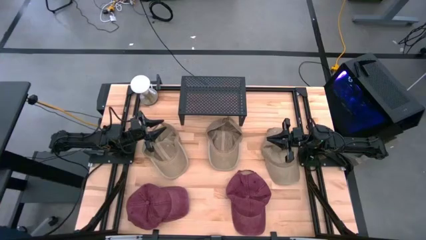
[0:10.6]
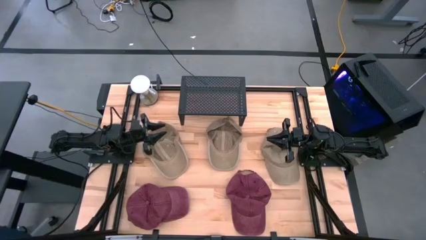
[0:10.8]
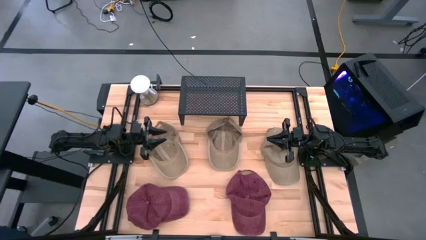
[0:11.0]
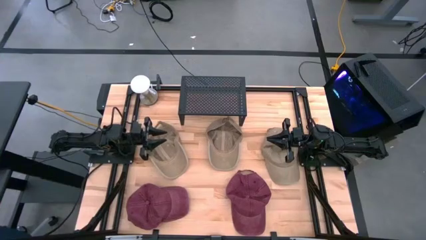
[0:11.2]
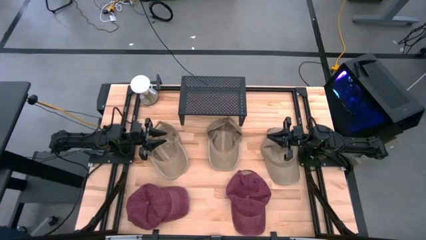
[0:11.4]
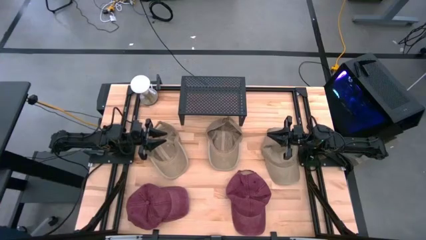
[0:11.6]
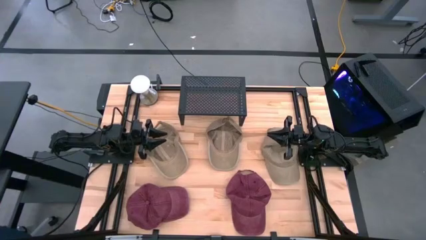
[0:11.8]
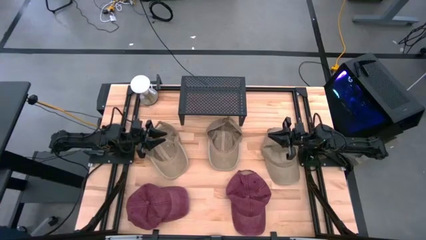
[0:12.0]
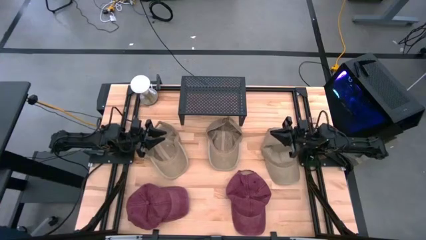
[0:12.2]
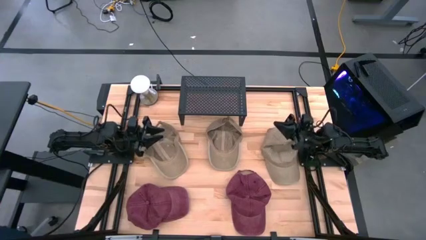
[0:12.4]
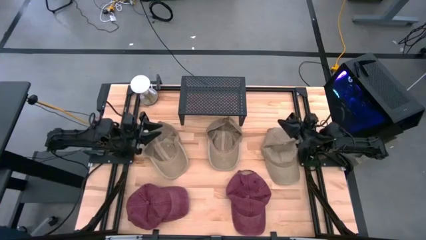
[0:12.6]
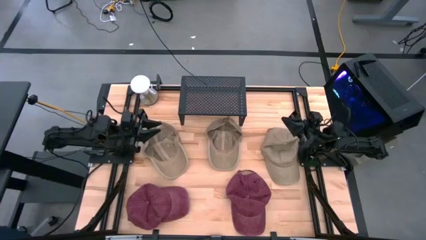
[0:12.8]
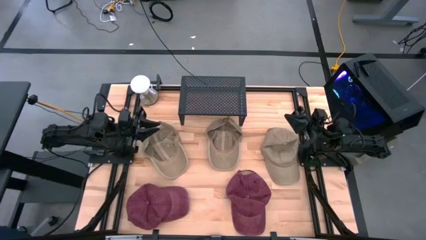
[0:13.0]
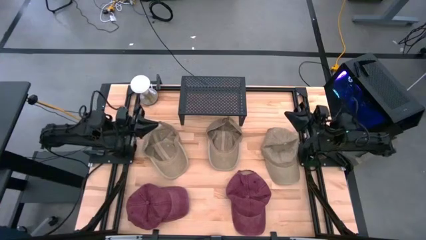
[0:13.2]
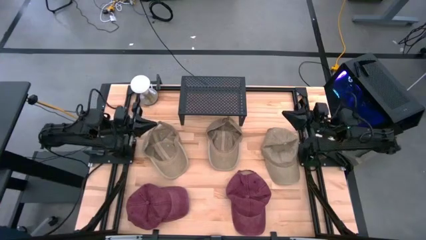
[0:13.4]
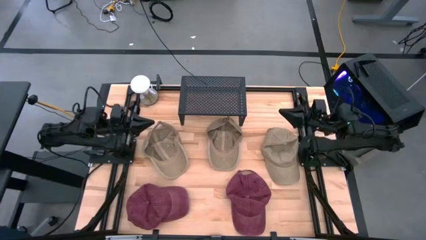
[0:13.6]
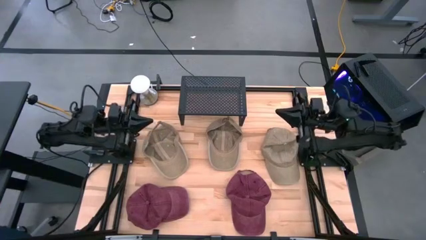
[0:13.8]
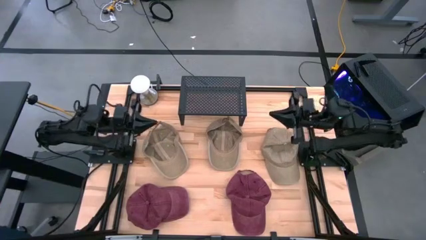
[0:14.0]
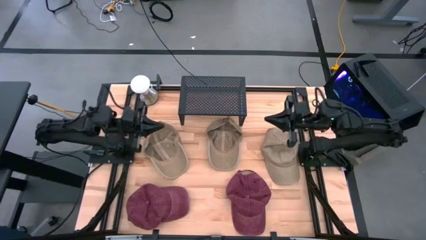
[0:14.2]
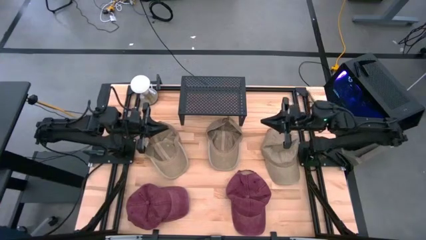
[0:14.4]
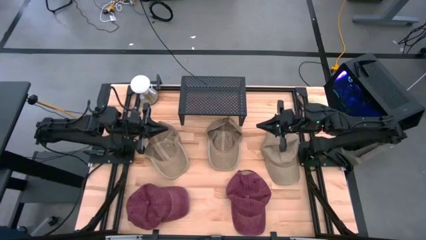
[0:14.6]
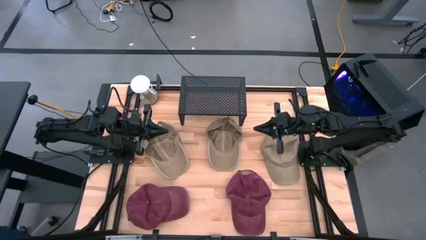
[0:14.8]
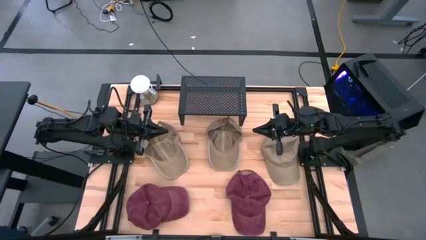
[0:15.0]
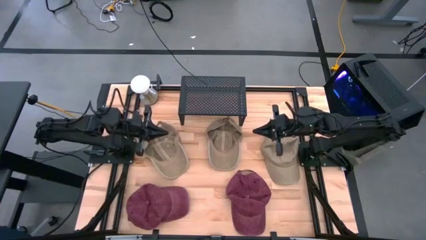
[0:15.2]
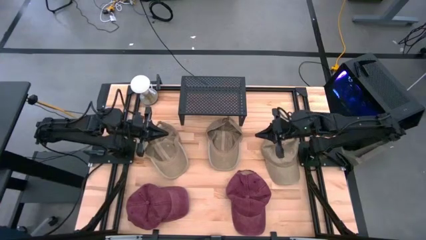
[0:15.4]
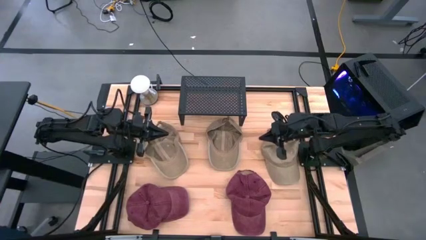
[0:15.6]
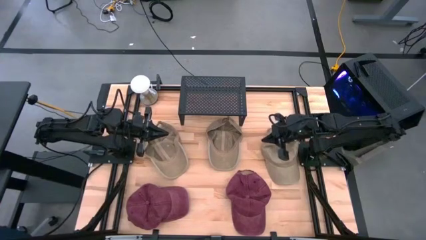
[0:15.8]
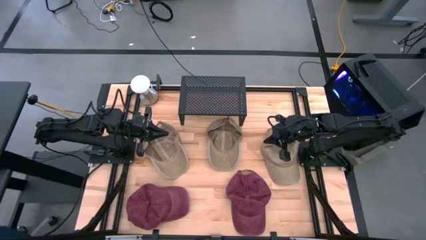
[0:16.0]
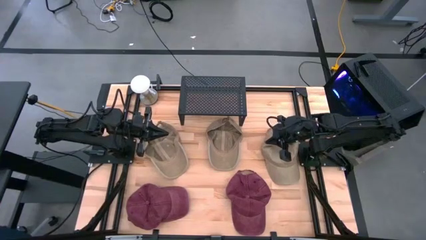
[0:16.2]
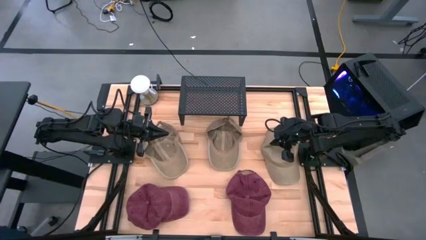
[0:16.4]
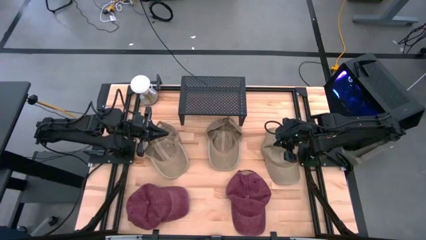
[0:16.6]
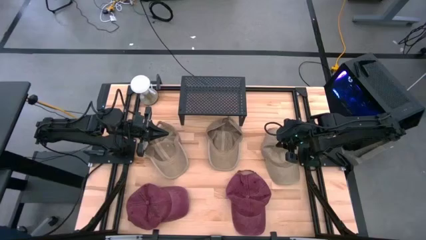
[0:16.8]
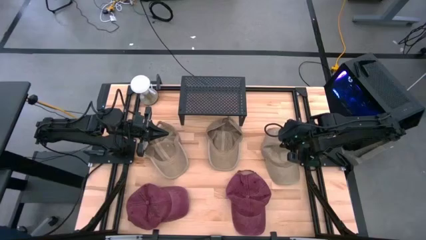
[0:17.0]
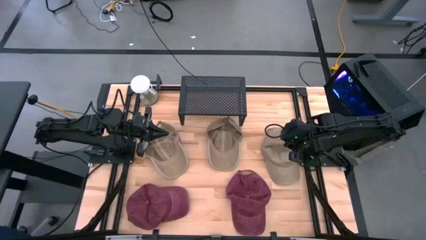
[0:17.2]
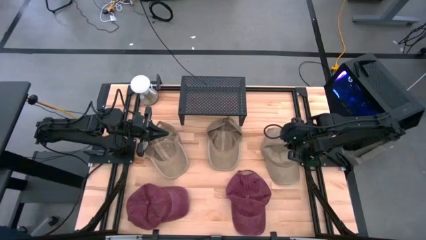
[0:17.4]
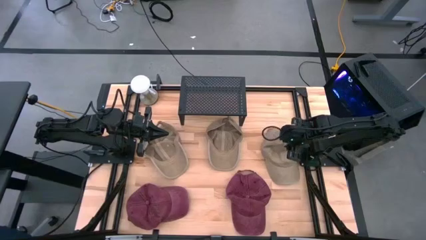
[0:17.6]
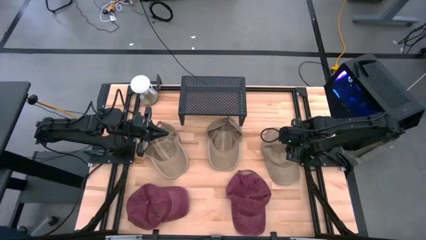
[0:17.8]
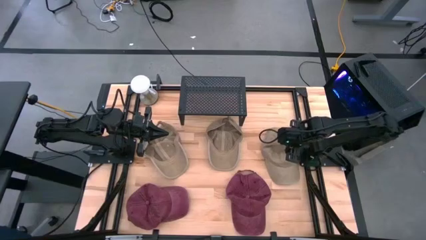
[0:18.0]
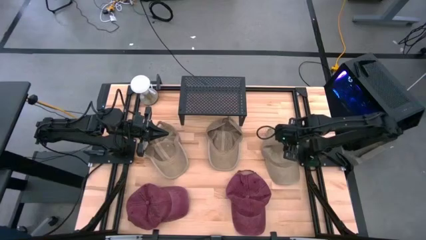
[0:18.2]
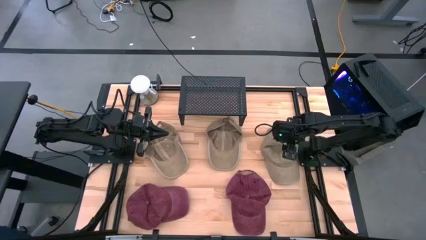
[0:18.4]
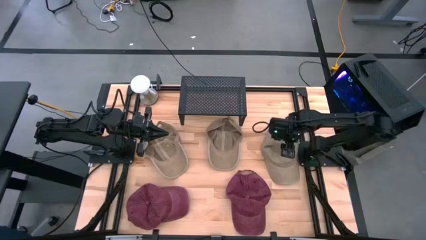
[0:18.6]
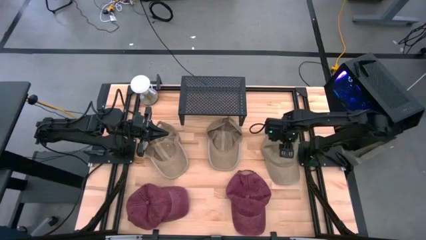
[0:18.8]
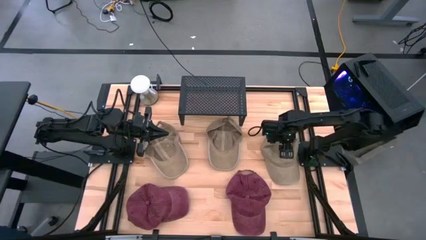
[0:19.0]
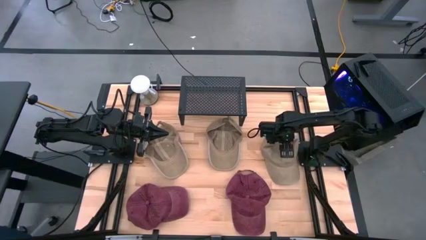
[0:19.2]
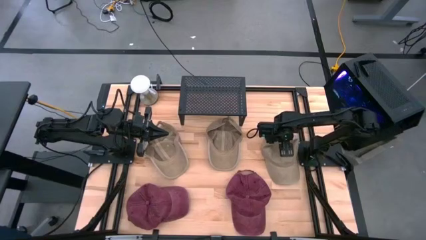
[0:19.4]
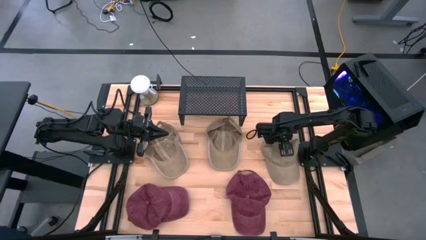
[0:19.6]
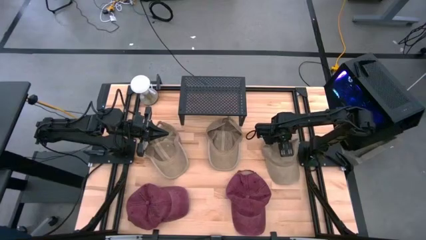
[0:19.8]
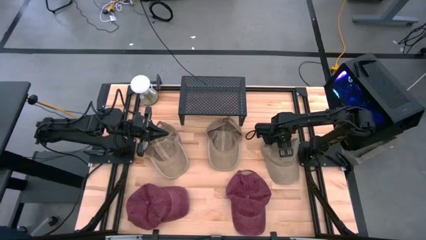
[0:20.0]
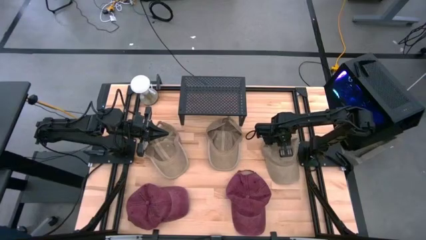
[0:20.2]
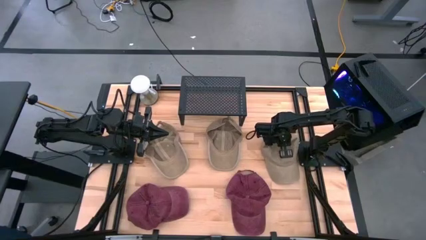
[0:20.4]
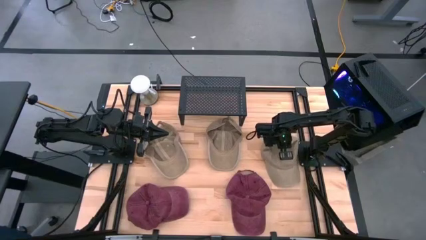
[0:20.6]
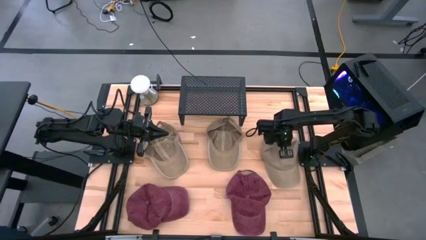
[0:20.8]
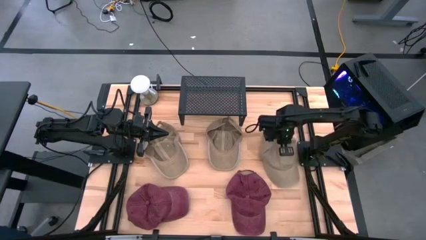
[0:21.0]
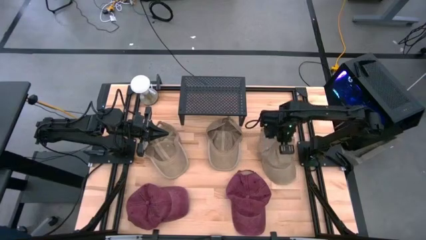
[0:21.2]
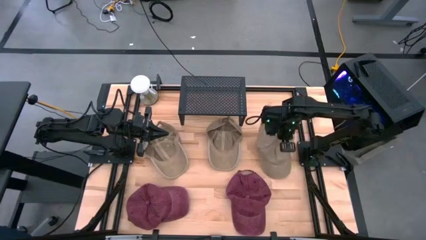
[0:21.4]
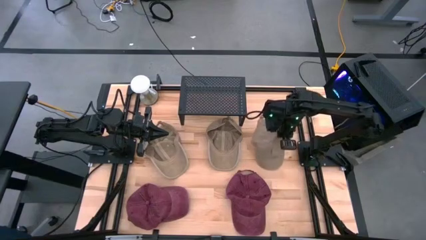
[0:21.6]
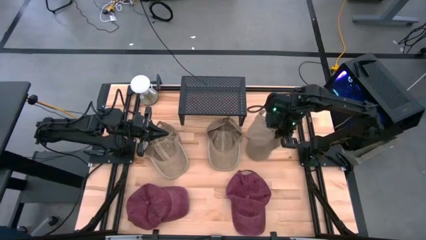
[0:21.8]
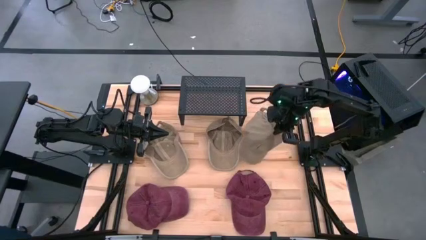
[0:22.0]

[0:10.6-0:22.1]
Task: Pick & Place hat
Put the right brown cap on the shelf
